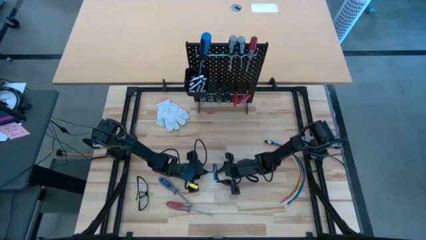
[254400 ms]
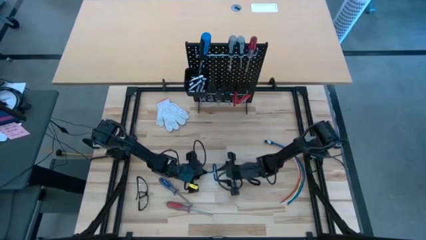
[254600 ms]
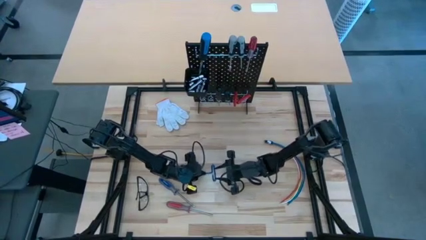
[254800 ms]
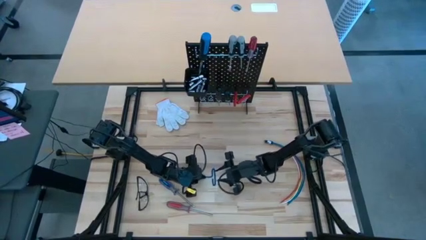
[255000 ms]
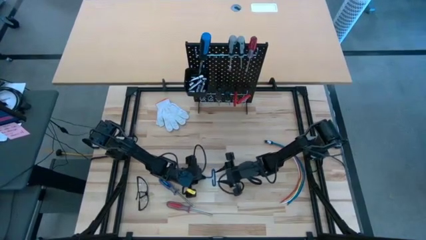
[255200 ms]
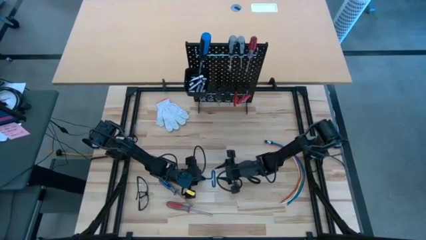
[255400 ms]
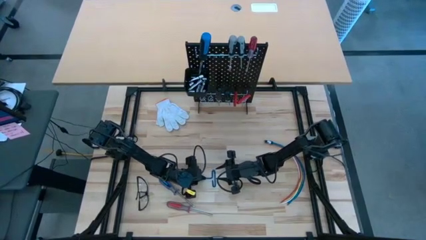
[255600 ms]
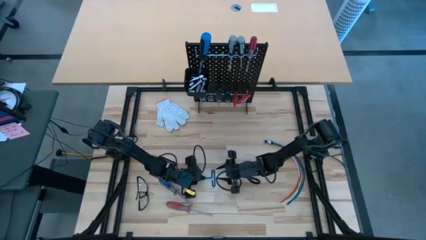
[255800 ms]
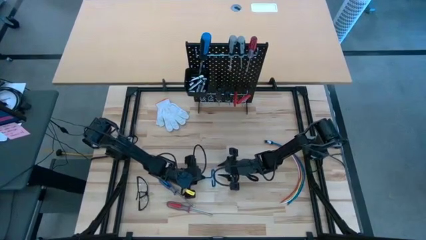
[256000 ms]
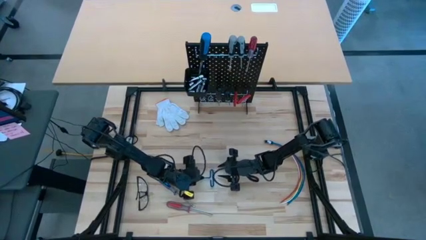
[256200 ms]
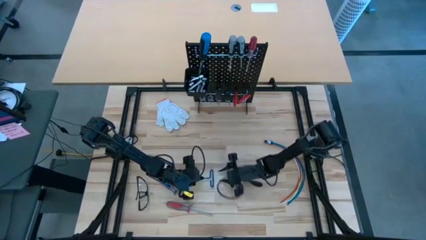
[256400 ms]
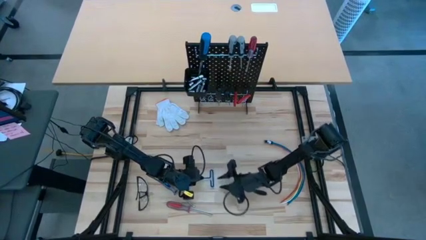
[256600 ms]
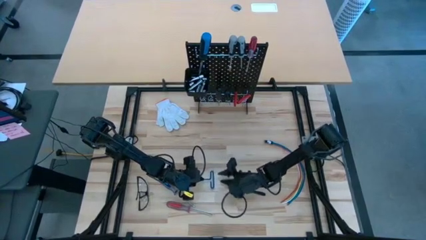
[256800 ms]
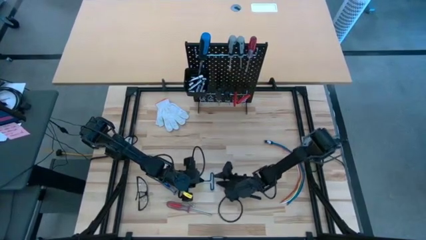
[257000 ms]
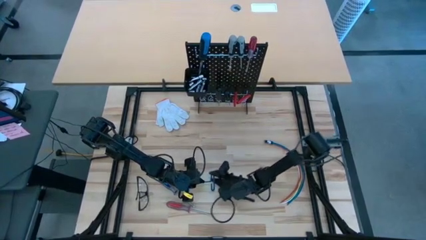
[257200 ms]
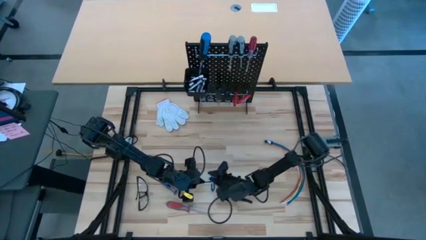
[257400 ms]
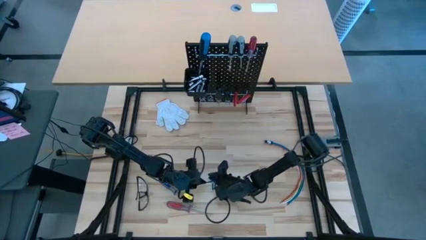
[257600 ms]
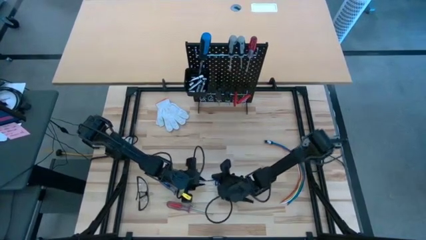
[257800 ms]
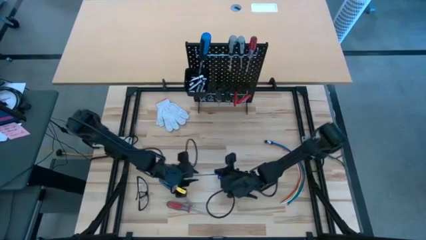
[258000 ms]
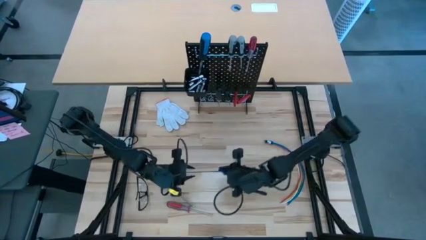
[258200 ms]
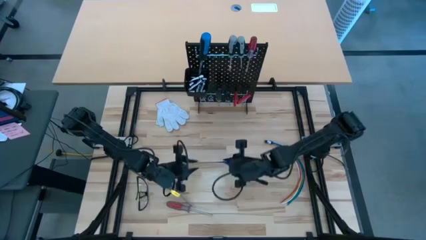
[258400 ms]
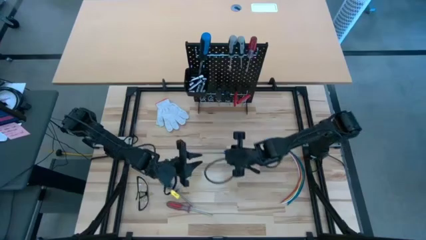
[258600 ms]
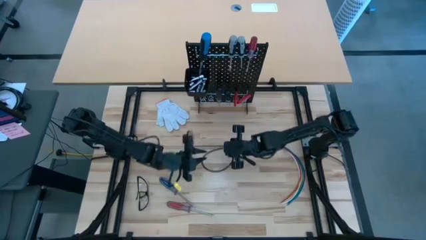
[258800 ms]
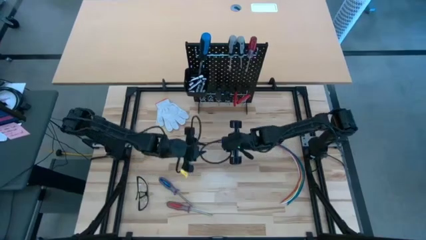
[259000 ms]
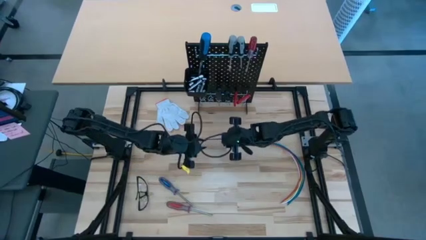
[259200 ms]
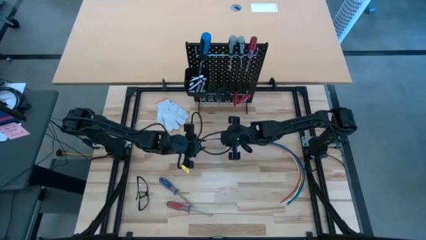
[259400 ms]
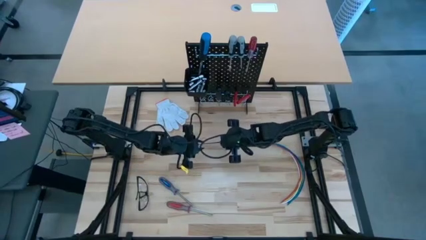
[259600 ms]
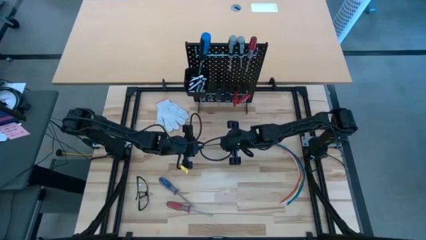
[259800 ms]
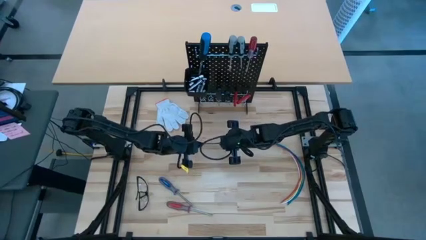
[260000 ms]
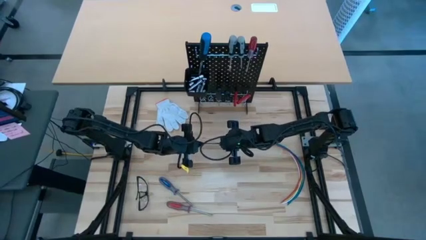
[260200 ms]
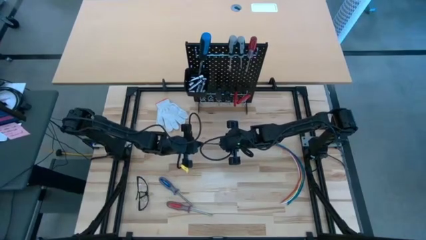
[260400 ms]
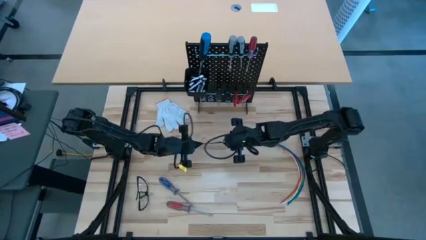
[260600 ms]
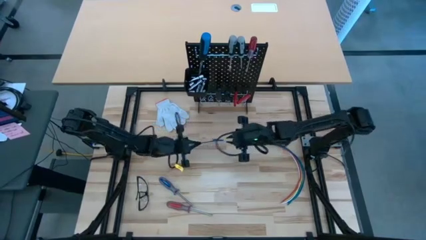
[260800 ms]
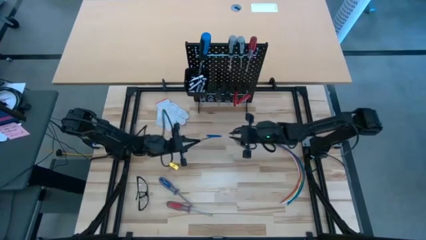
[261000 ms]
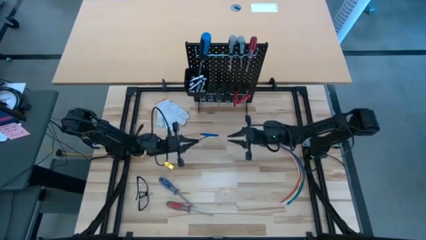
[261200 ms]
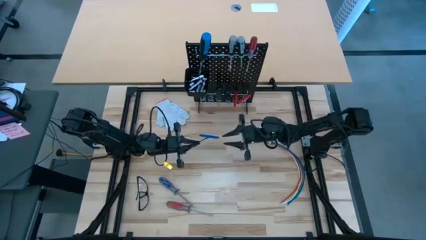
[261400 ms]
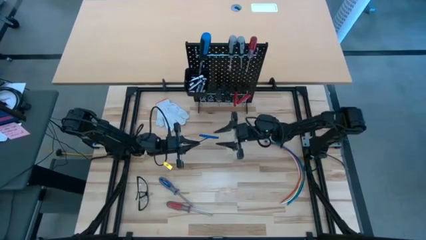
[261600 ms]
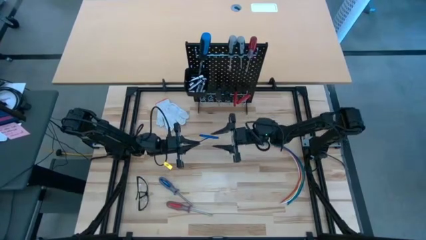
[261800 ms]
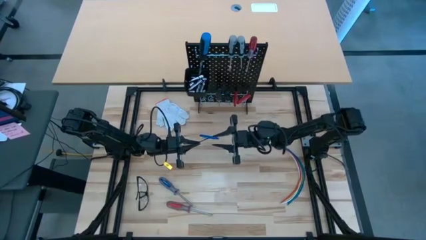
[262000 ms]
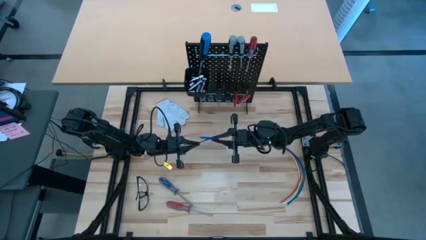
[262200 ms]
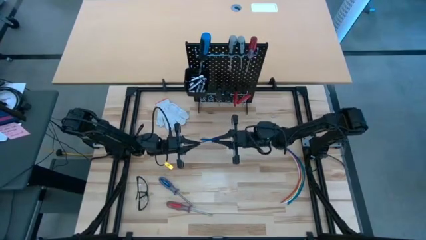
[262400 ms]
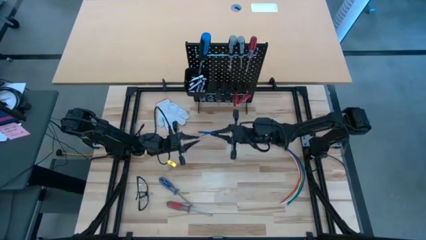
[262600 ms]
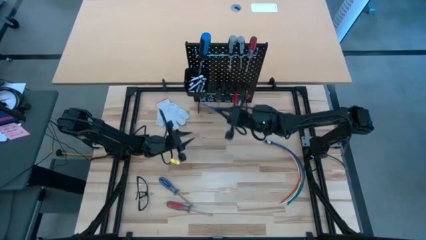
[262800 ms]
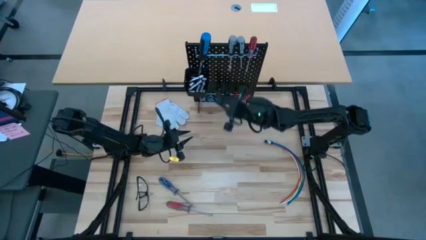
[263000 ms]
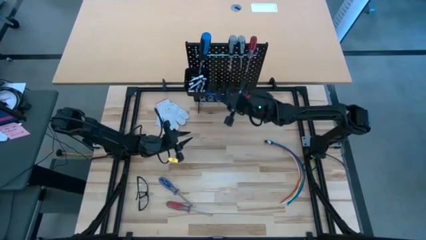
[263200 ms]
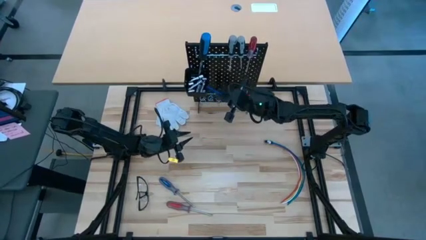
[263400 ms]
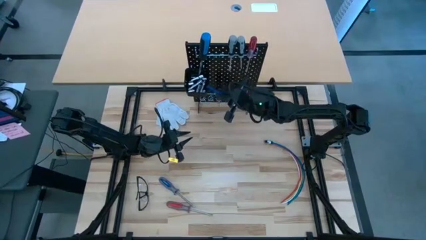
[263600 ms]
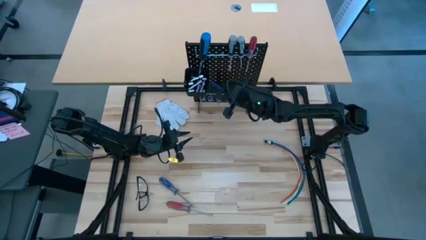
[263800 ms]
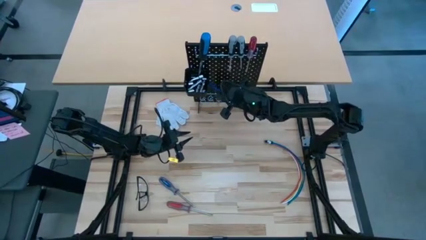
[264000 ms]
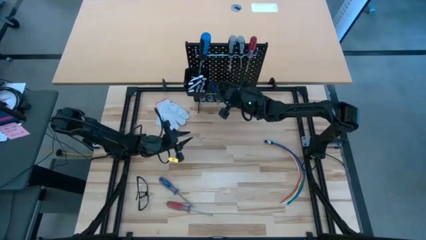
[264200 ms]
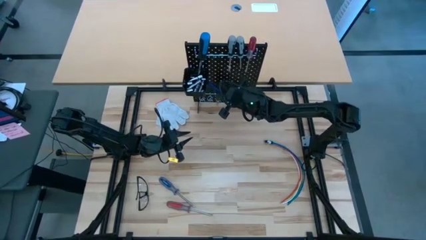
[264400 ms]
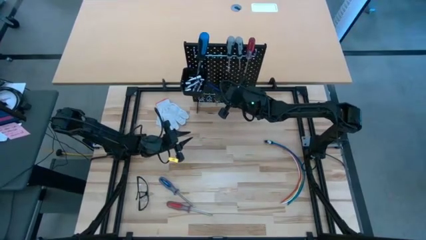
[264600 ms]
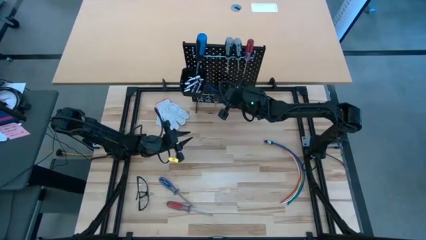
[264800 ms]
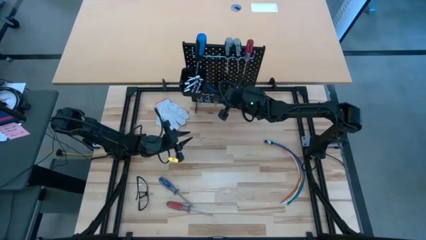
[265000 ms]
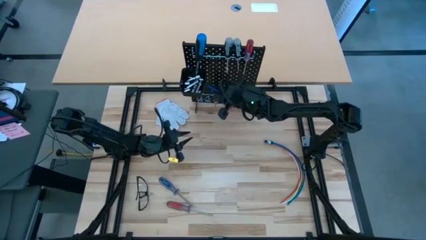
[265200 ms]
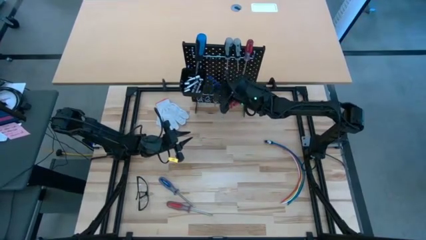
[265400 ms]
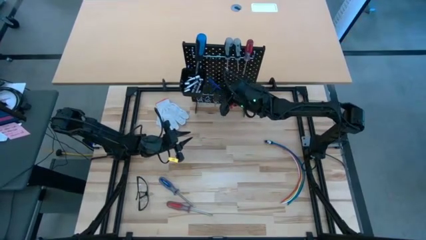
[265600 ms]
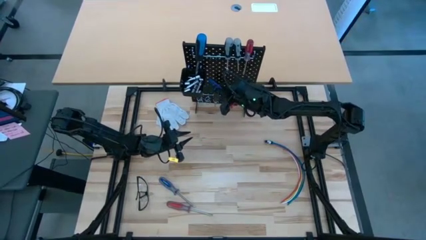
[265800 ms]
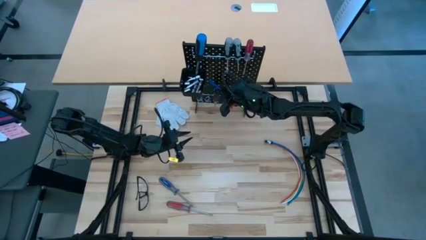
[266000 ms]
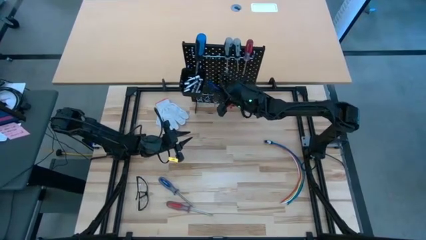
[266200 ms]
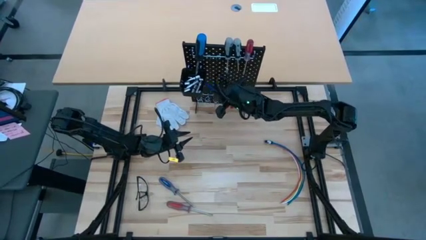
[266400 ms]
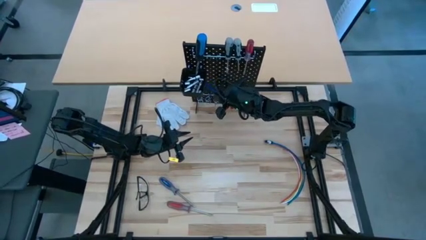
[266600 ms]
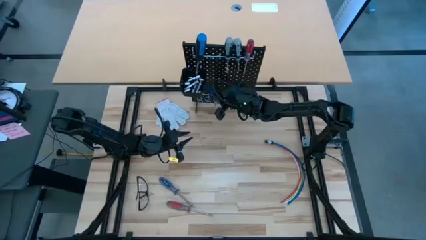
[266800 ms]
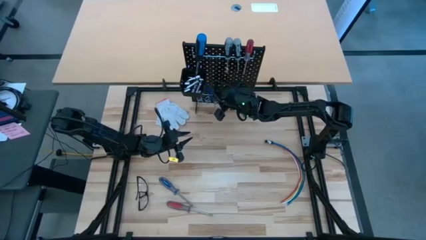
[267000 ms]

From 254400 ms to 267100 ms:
Task: Hang tools onto peg board
Hang the blue pick tool on the pegboard

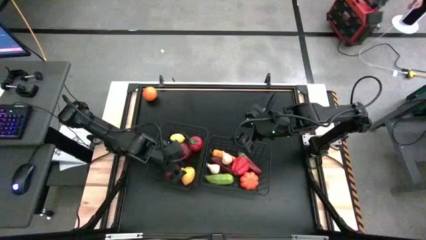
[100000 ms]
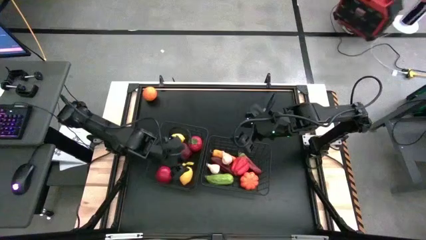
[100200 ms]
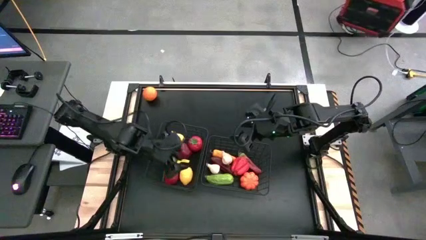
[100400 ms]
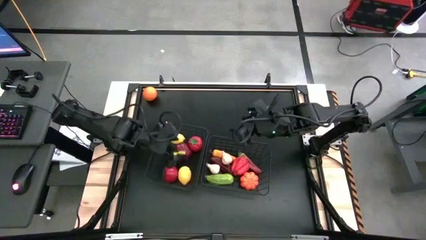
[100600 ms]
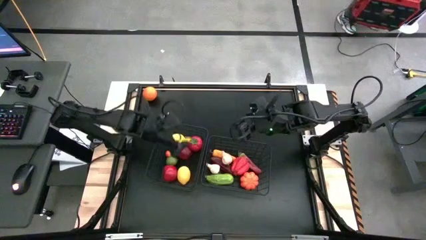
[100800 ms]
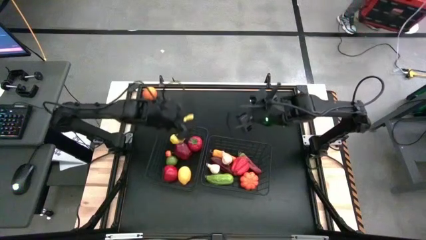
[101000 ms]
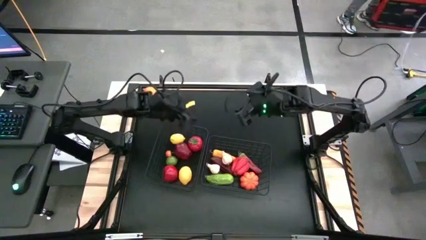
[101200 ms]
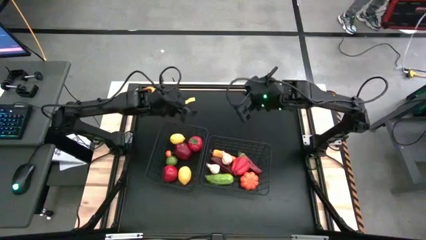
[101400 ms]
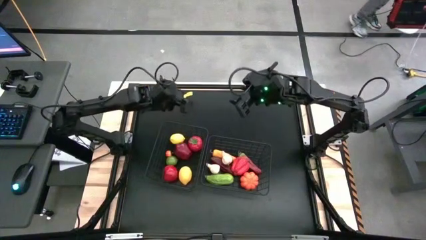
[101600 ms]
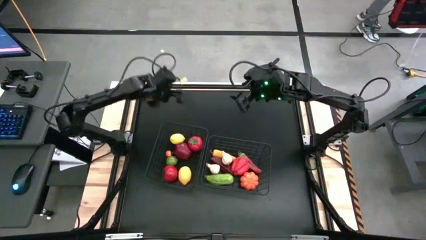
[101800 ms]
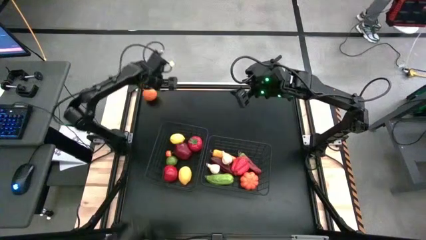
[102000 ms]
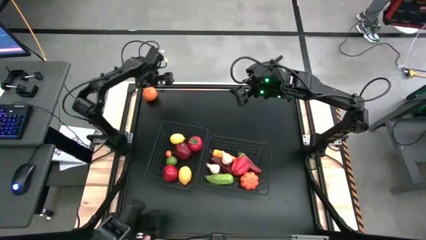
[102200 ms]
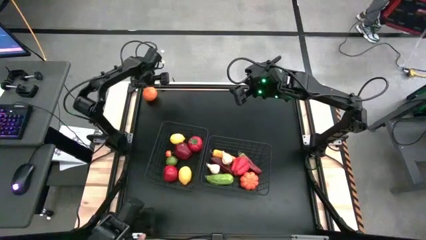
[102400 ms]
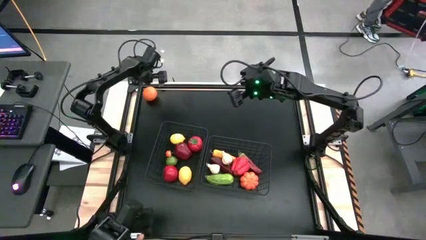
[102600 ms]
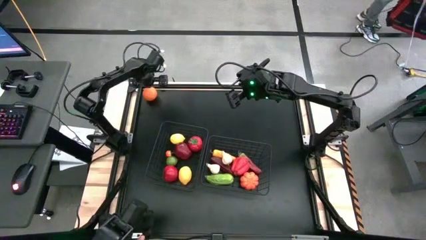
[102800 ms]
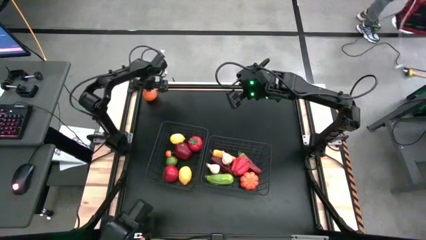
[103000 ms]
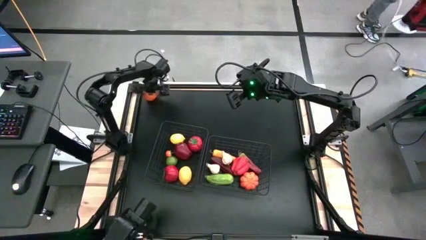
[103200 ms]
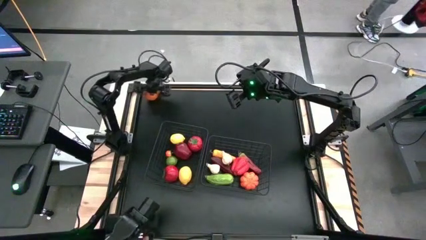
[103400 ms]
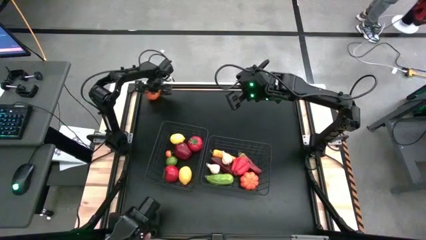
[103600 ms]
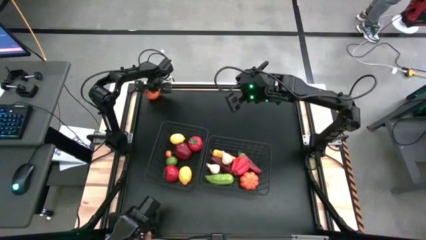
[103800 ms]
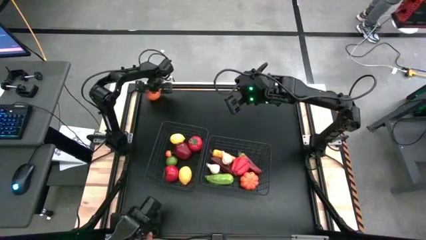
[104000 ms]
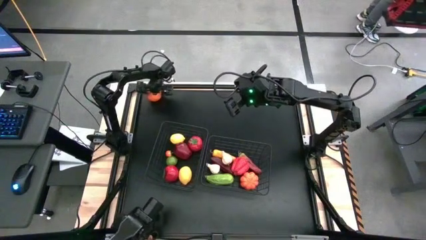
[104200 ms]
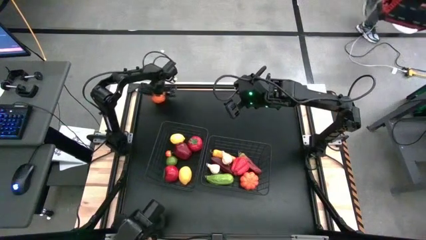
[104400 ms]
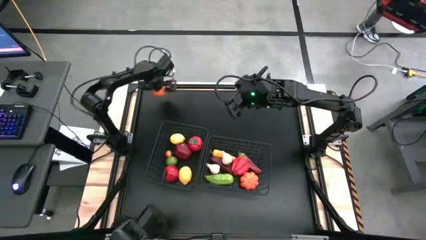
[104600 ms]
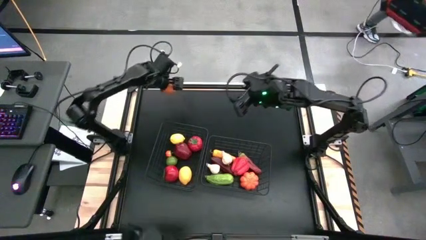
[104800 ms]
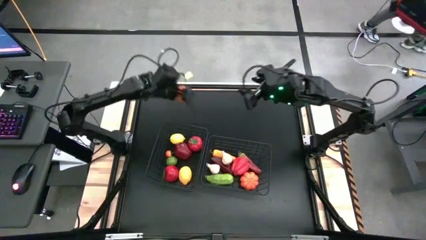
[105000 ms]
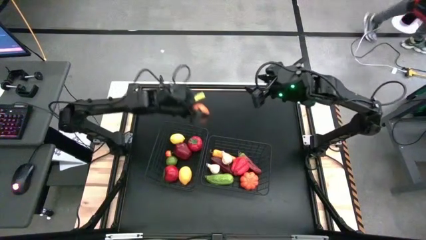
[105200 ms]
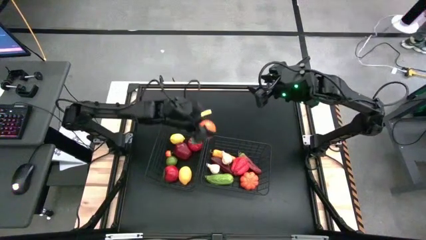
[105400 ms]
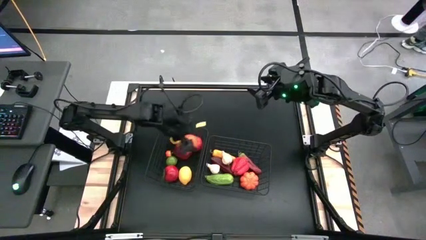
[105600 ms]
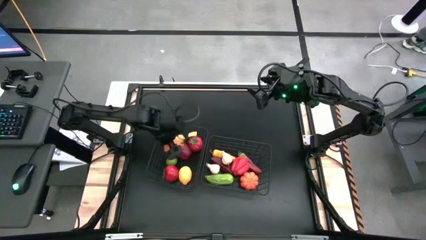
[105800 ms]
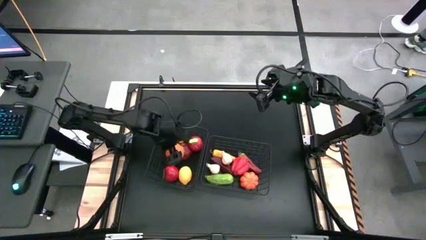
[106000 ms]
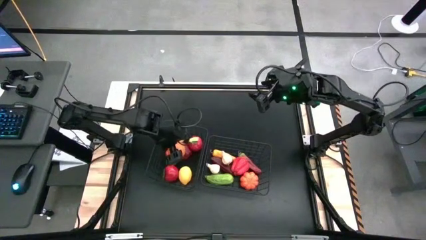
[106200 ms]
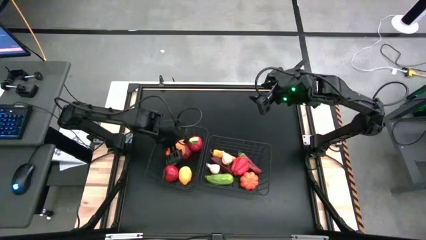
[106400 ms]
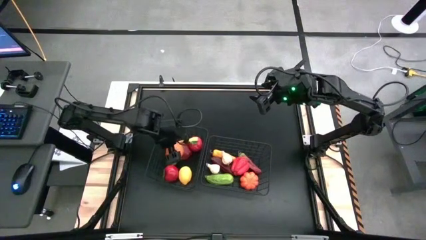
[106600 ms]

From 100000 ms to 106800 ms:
Task: Sort produce into baskets
Put the orange into the left wire basket
